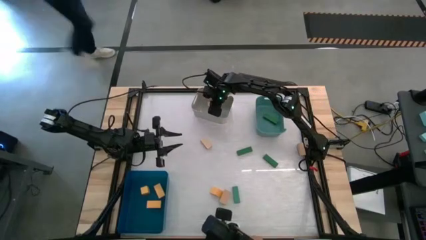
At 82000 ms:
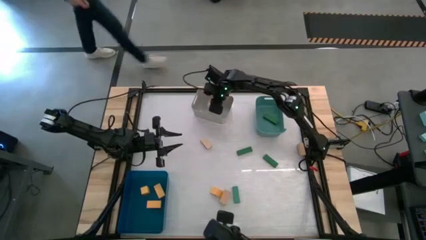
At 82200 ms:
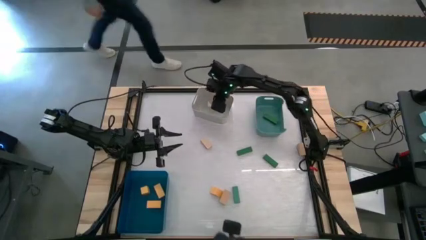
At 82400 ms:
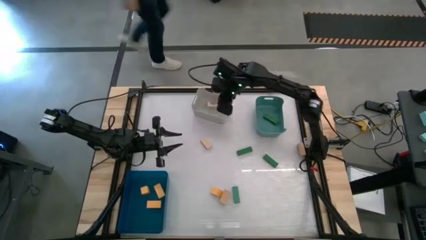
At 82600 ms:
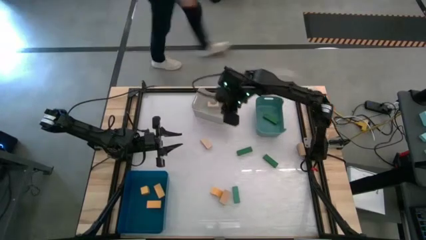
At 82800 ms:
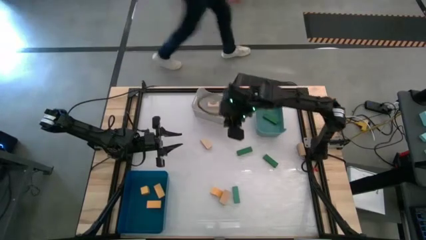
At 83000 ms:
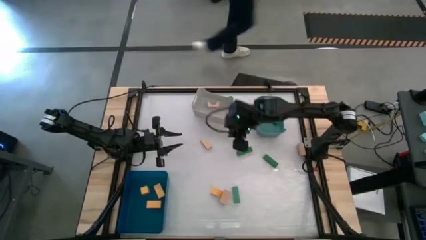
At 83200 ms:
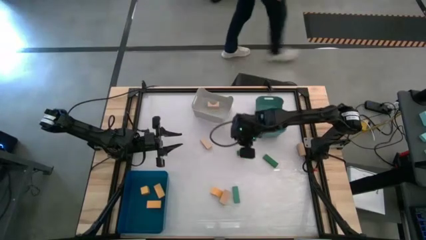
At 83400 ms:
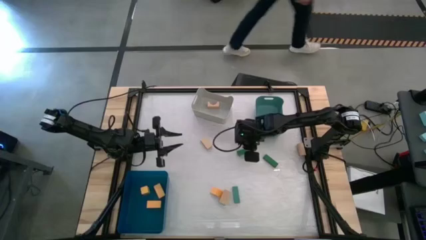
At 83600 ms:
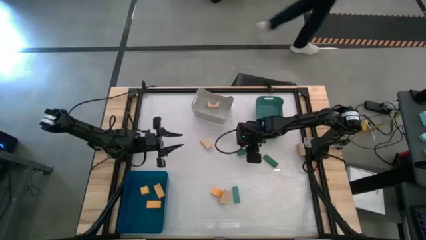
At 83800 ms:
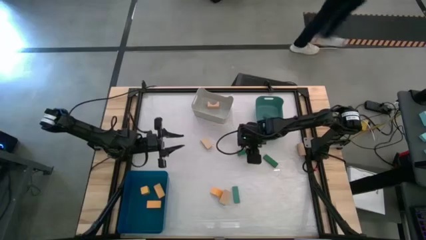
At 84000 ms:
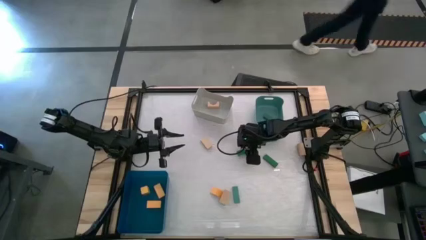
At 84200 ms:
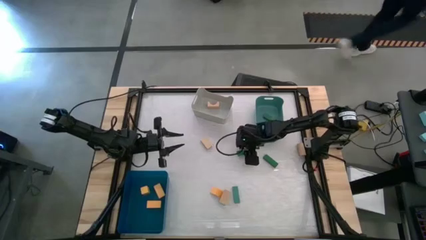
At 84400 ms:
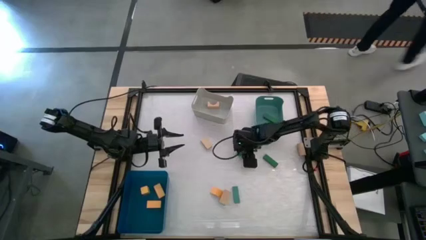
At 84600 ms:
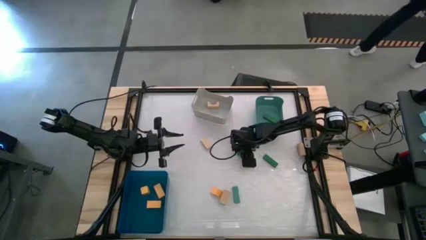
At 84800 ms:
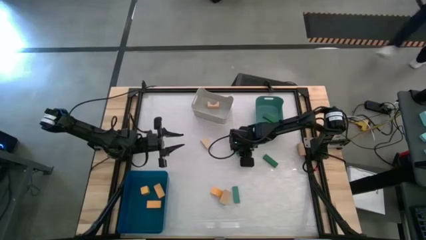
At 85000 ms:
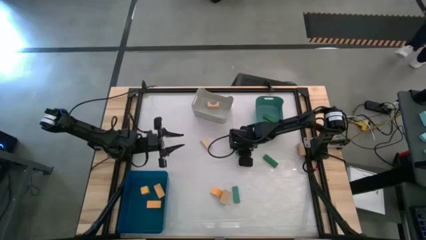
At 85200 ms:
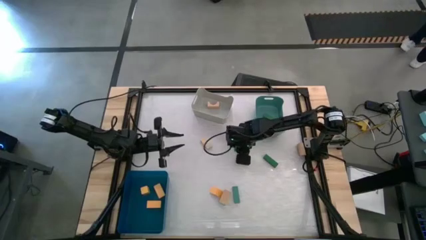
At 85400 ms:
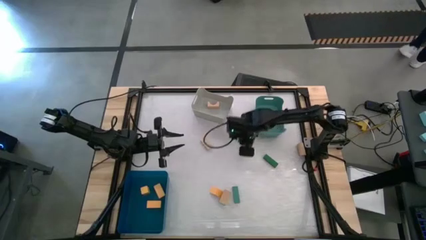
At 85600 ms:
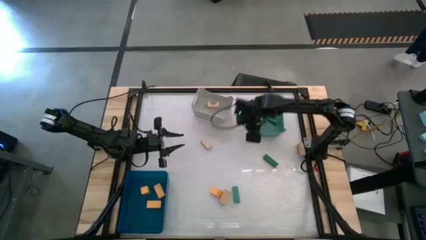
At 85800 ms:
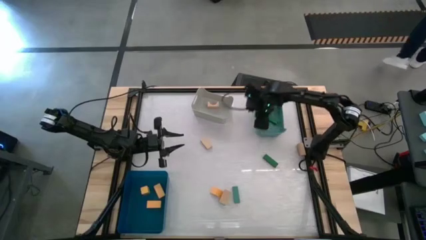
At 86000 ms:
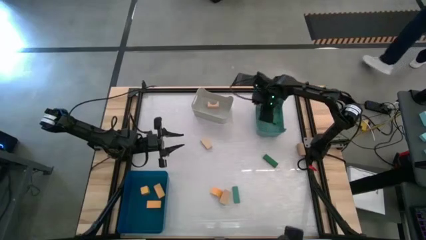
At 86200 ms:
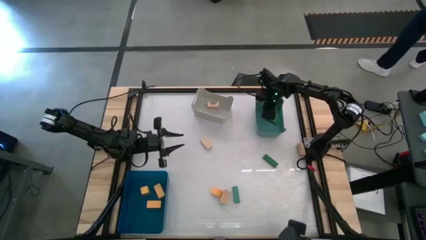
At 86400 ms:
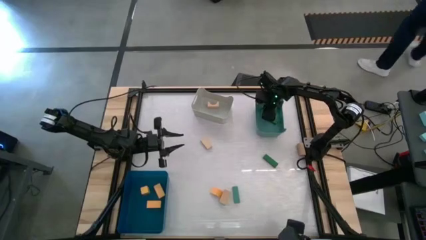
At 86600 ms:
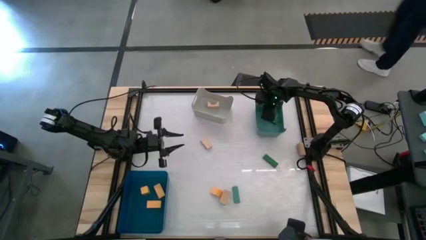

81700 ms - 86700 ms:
Task: Sort & place blocks by color
Put the green block into the green bin

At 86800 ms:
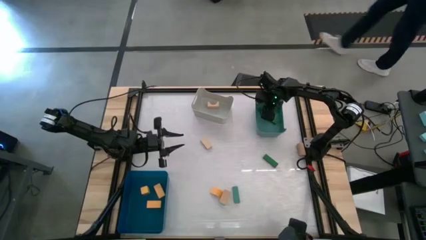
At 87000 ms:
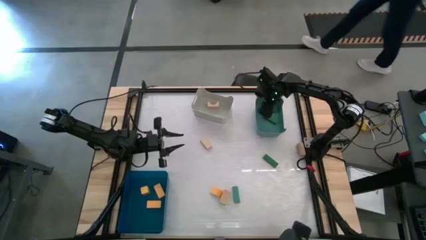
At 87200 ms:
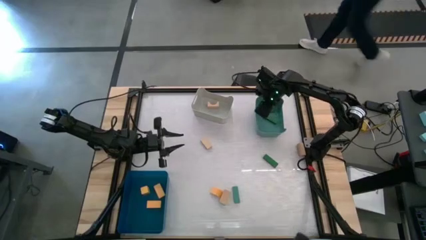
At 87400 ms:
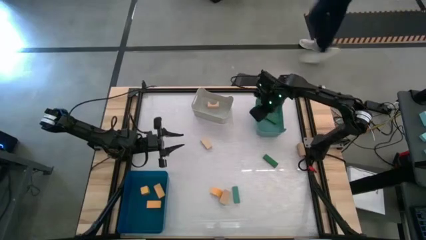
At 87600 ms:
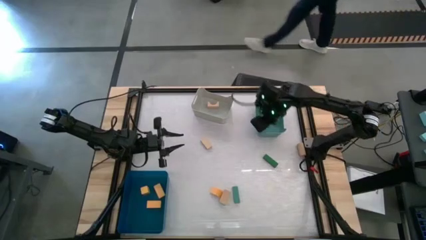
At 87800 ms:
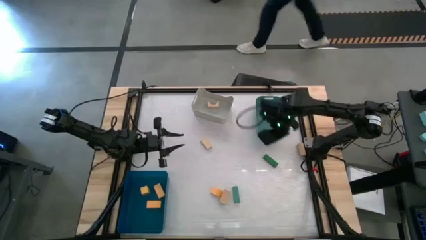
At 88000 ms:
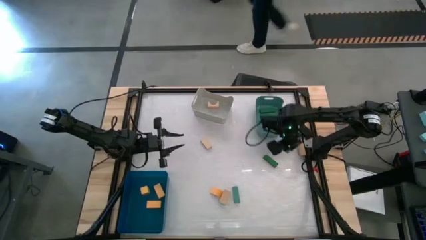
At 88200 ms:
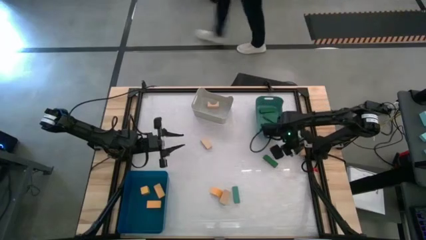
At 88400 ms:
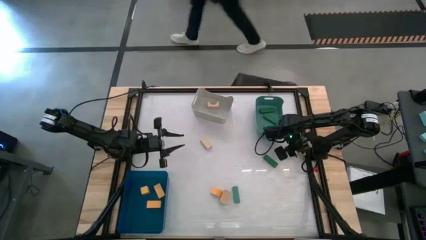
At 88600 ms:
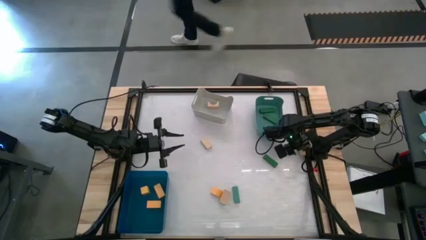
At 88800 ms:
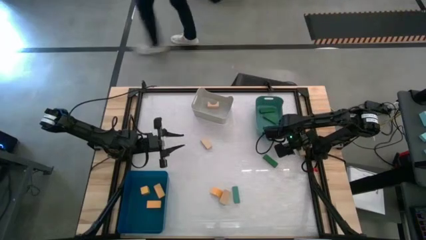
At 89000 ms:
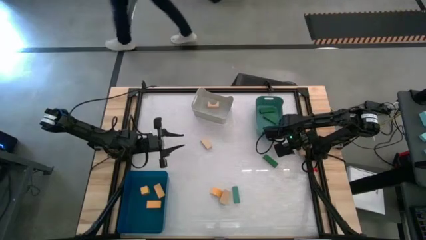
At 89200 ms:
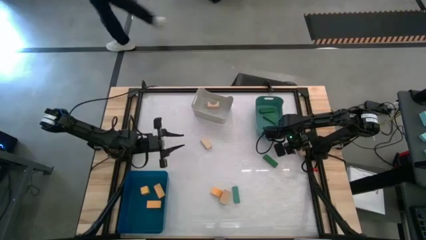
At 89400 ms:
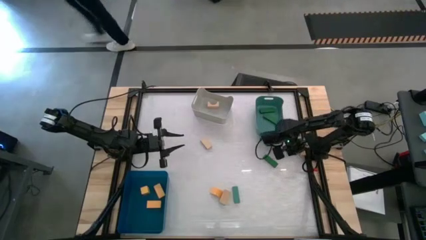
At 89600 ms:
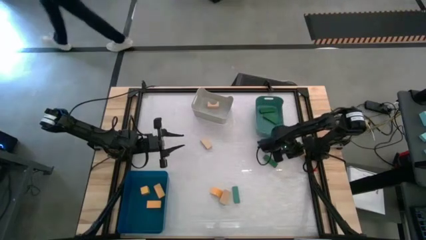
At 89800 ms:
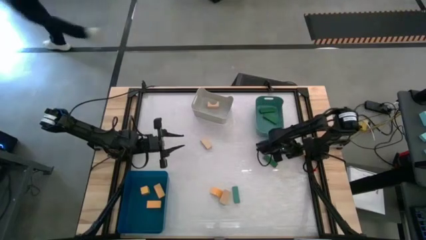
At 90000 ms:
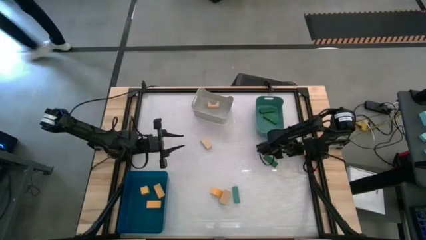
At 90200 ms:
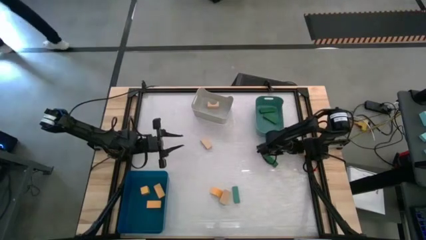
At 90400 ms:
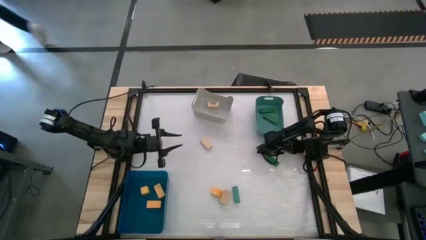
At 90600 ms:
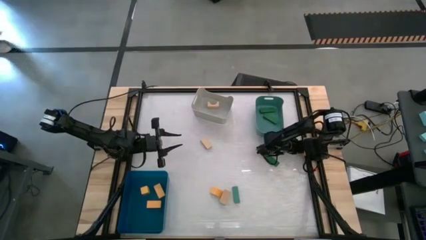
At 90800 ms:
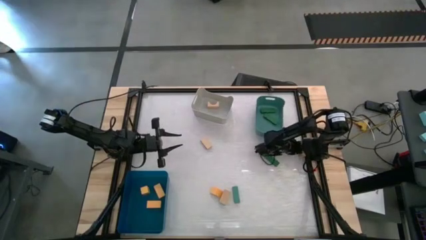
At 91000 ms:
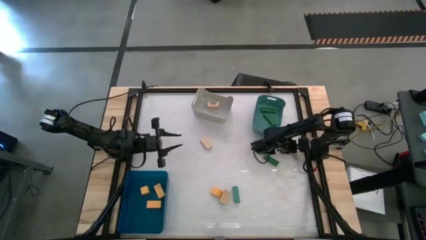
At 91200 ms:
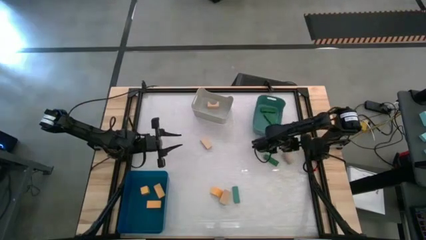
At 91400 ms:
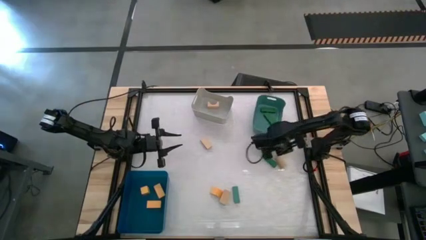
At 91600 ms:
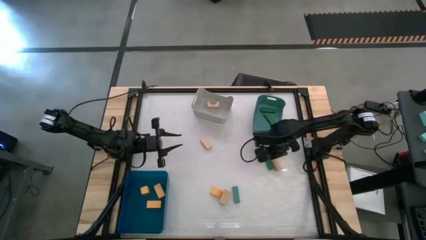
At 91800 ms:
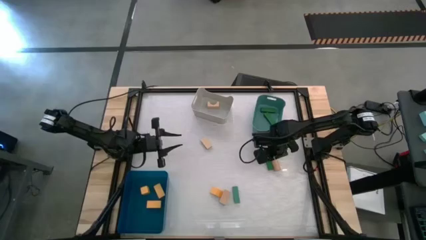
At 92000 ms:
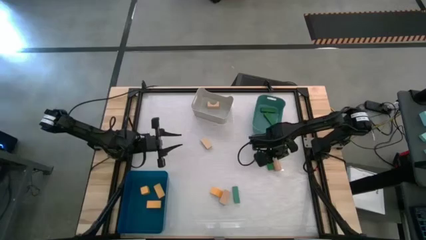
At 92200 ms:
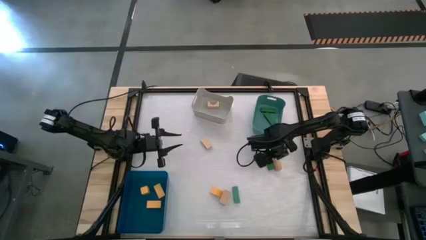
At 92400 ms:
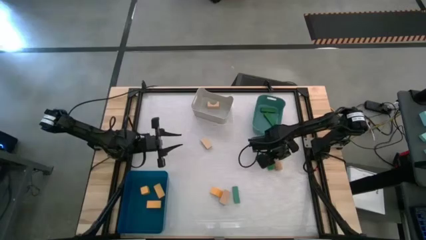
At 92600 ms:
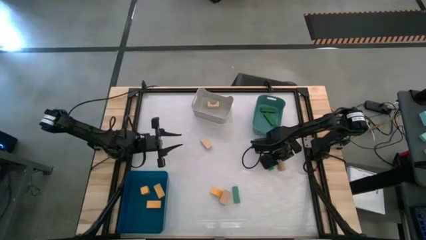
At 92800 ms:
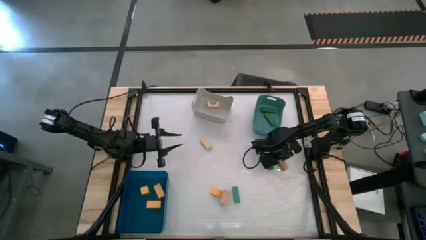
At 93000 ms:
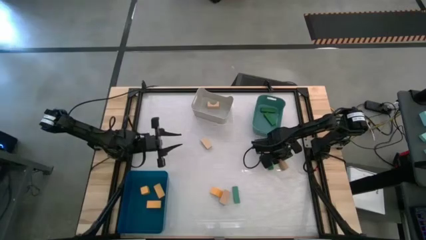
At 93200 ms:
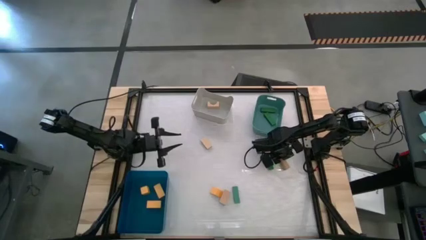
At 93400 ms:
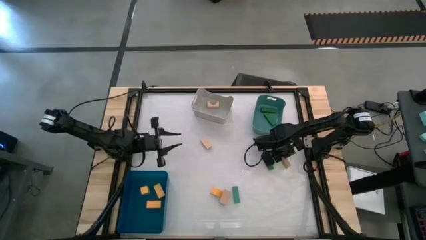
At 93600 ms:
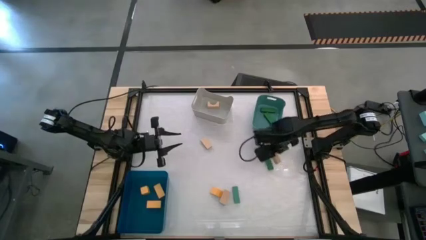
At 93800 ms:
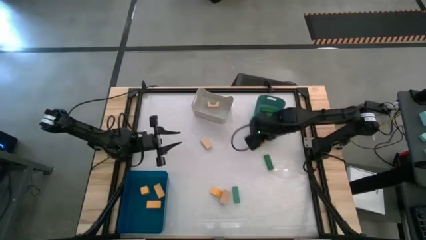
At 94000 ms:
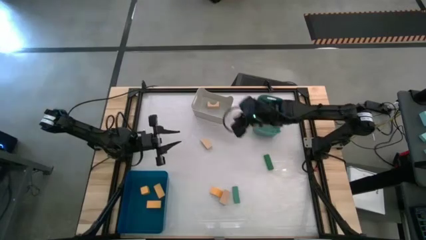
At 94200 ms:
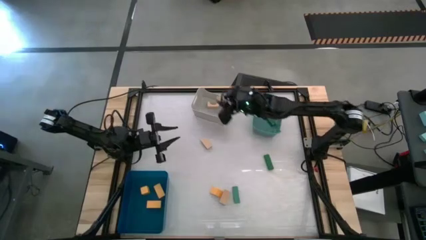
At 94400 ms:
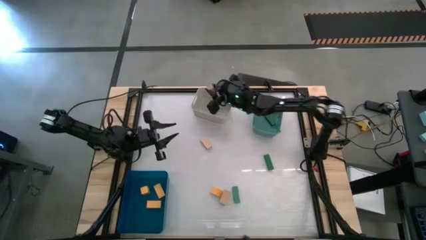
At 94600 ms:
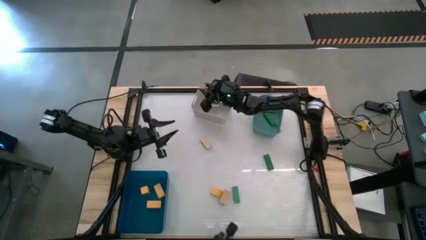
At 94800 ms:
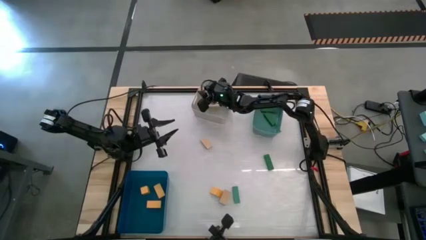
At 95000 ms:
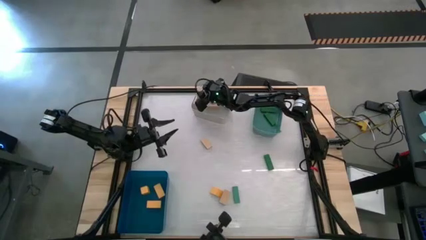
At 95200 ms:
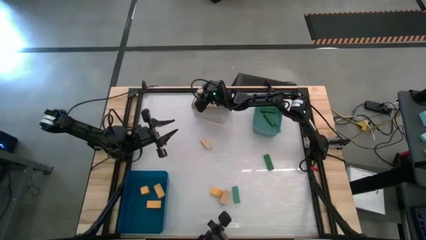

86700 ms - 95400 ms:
Put the brown block into the gray bin

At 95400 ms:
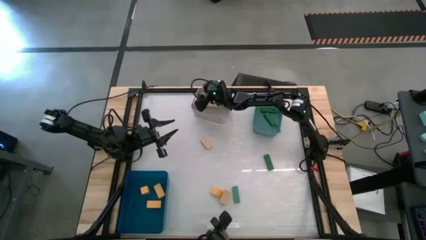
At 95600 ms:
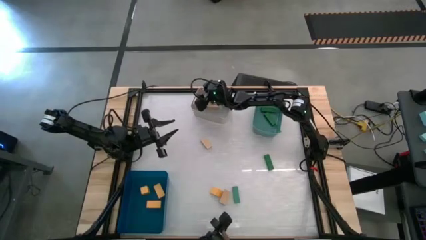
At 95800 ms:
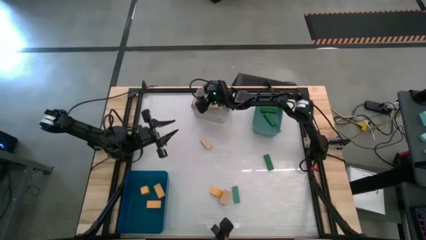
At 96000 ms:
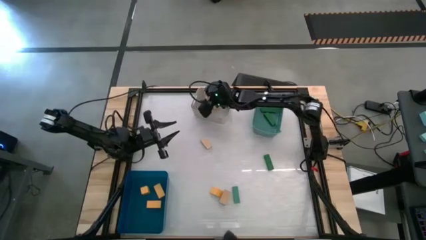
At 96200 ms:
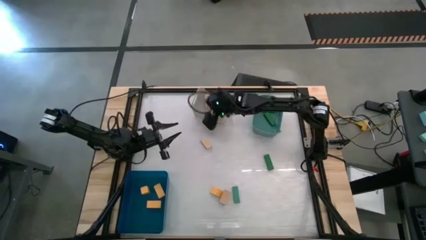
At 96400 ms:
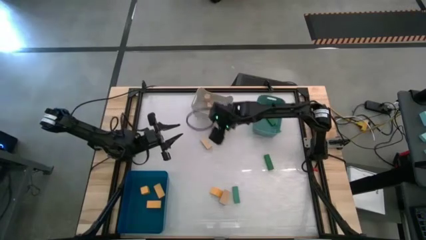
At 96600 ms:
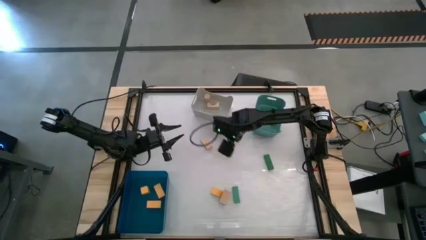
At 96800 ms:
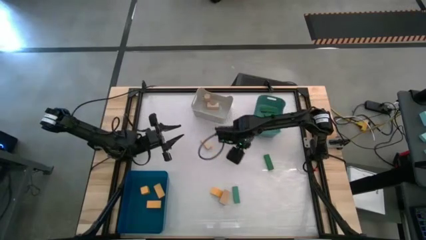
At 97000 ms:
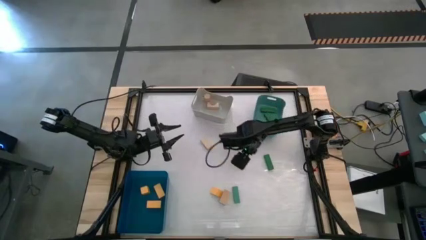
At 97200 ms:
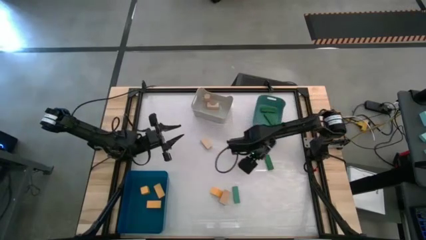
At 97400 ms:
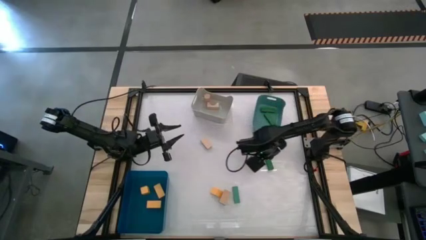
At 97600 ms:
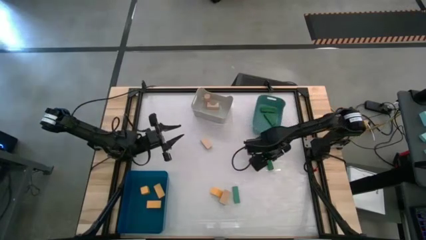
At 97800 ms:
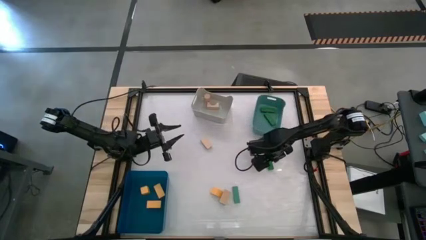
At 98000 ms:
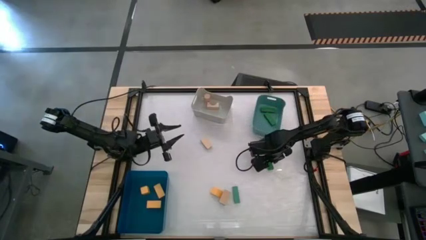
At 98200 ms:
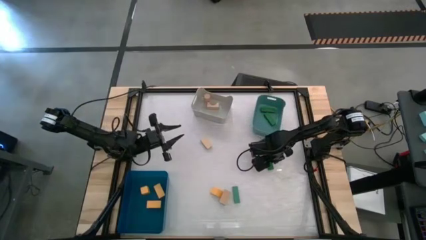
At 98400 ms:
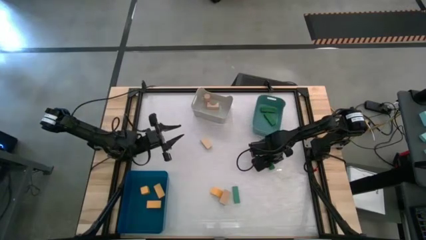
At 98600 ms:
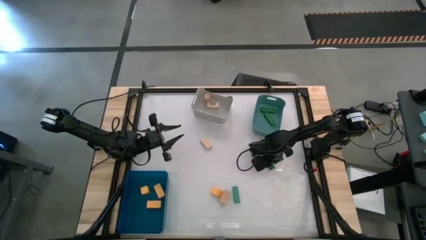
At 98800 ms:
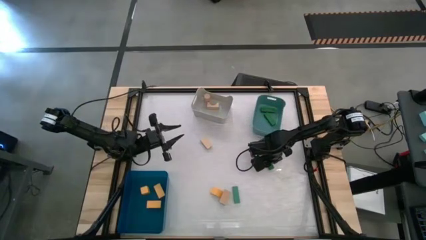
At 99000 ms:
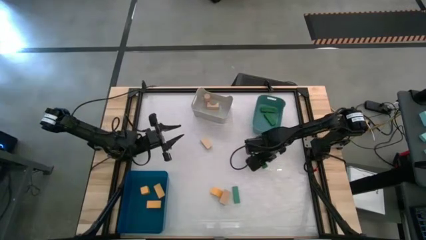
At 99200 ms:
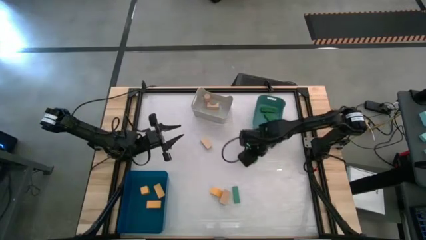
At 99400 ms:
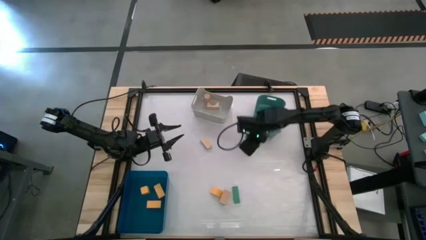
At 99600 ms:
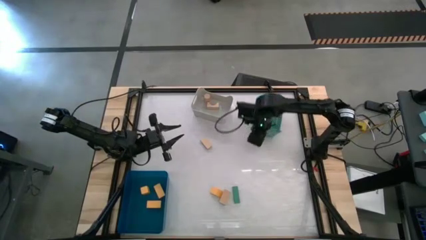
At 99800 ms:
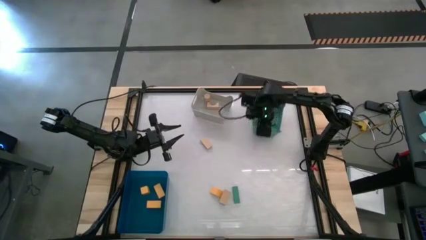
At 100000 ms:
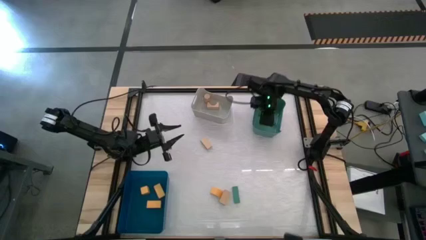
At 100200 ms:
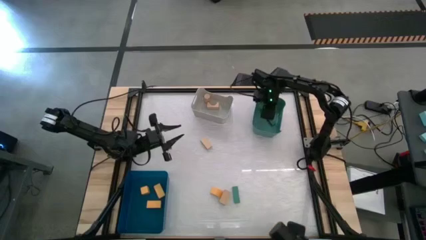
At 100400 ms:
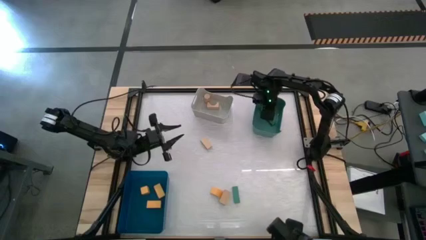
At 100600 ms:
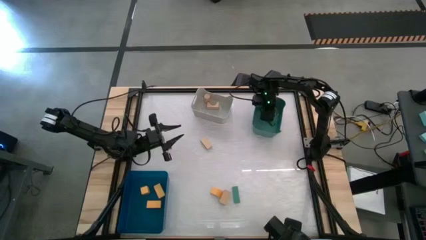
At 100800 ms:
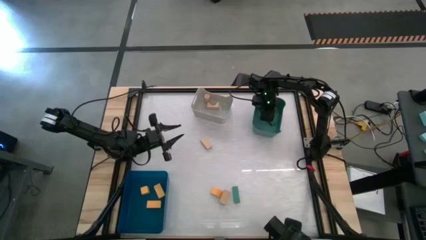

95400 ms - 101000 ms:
Put the green block into the green bin
